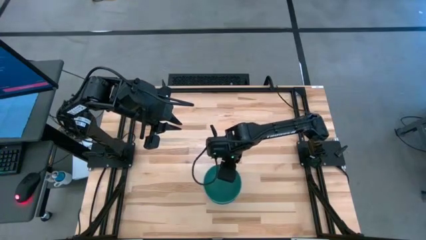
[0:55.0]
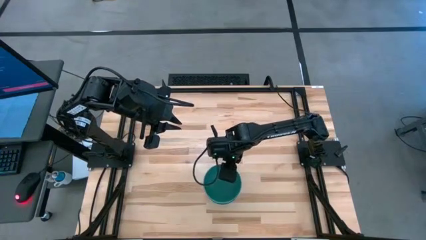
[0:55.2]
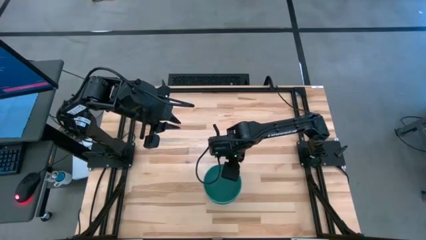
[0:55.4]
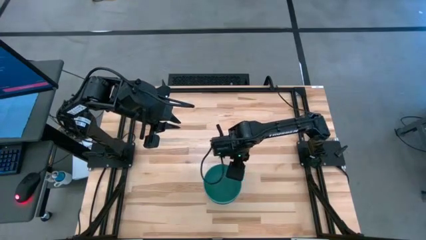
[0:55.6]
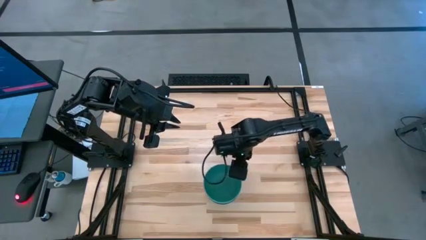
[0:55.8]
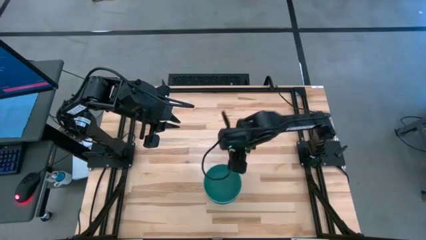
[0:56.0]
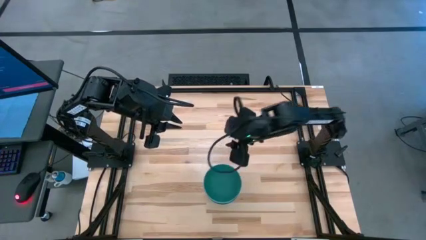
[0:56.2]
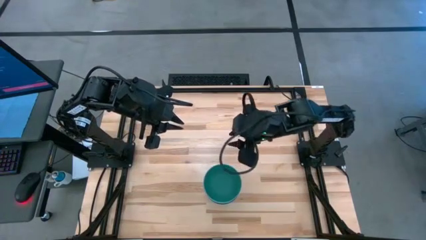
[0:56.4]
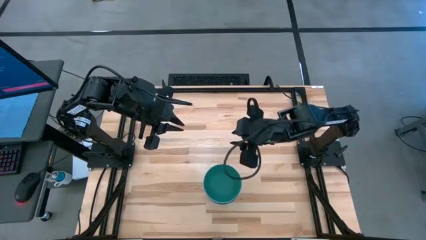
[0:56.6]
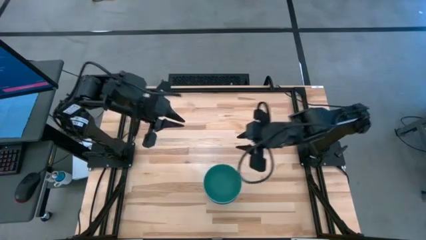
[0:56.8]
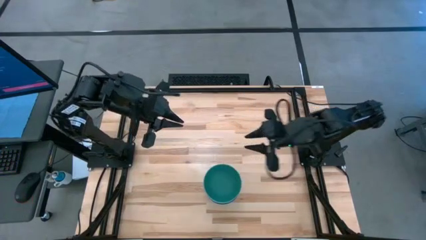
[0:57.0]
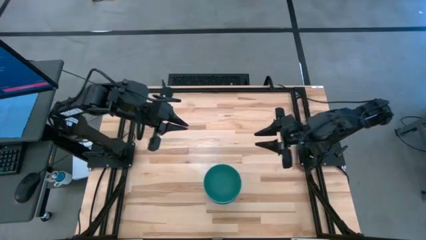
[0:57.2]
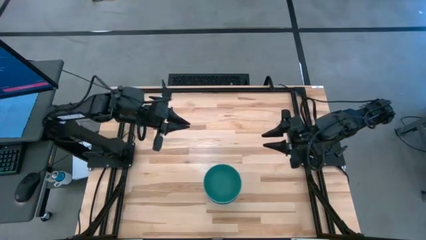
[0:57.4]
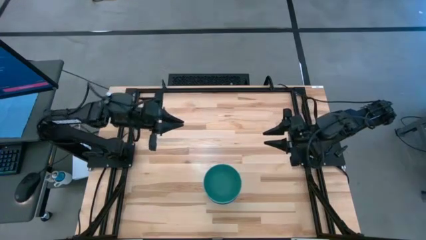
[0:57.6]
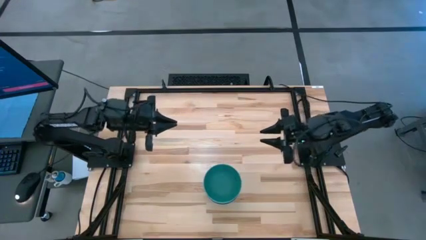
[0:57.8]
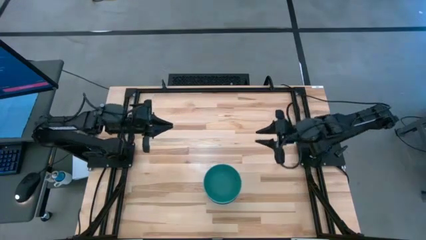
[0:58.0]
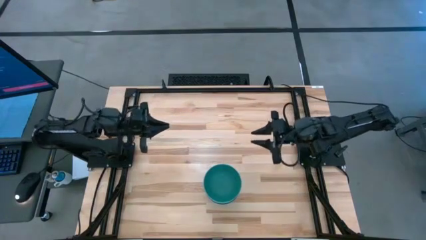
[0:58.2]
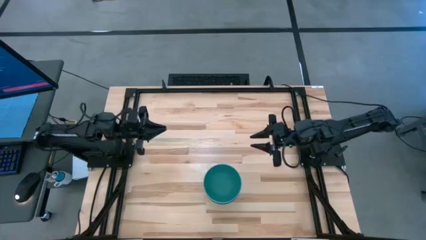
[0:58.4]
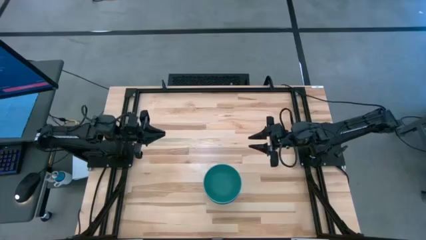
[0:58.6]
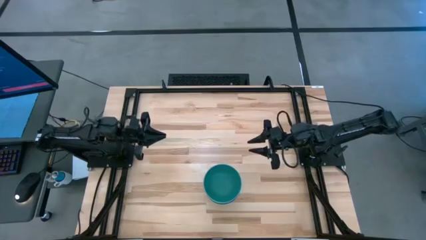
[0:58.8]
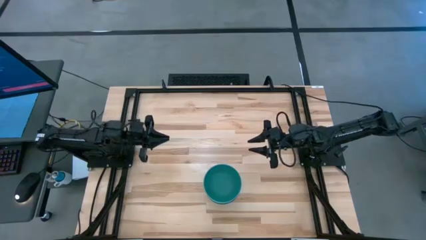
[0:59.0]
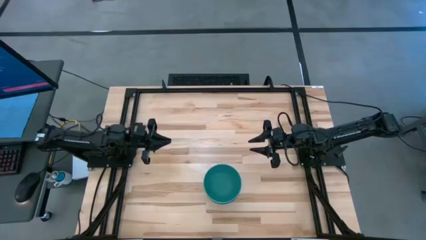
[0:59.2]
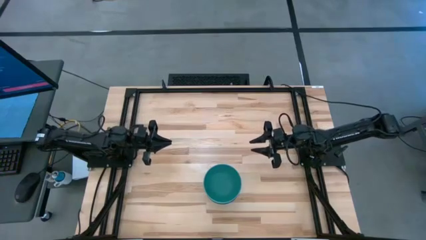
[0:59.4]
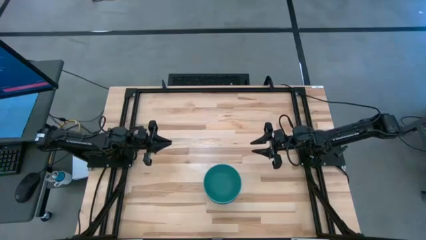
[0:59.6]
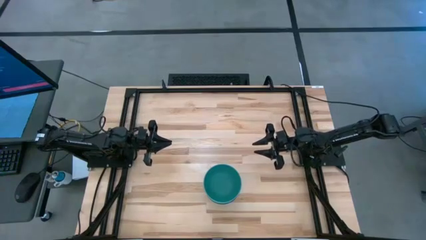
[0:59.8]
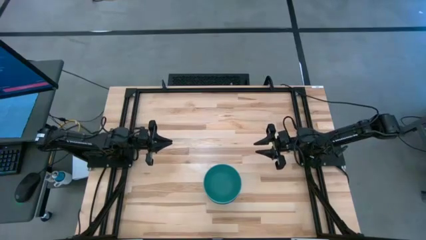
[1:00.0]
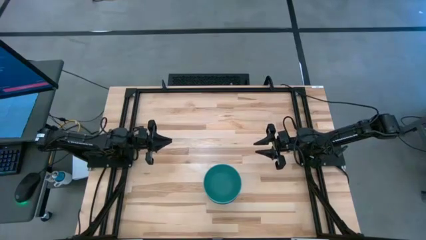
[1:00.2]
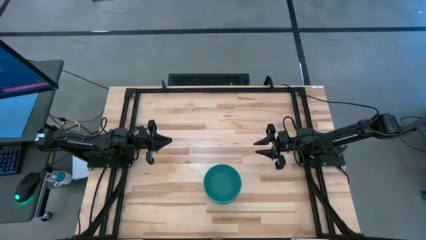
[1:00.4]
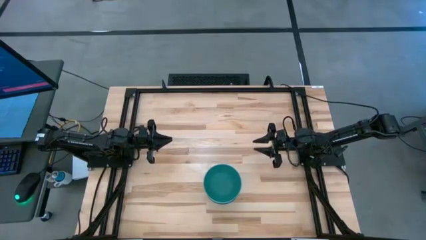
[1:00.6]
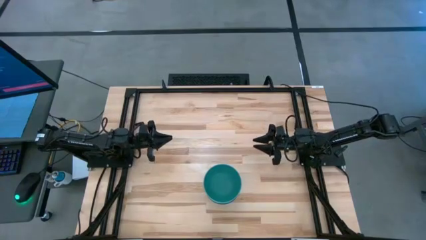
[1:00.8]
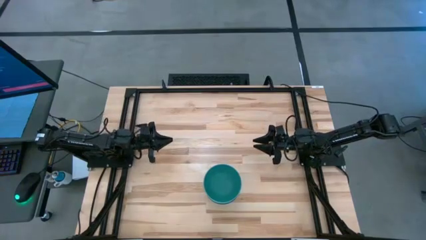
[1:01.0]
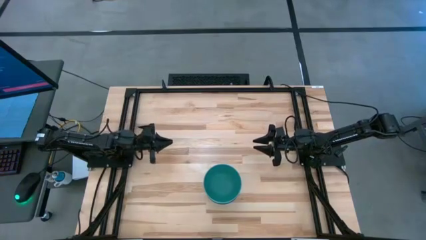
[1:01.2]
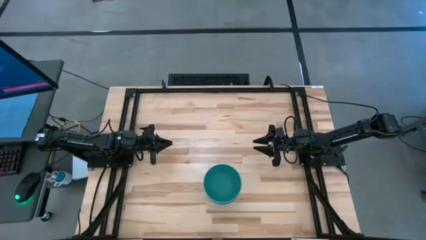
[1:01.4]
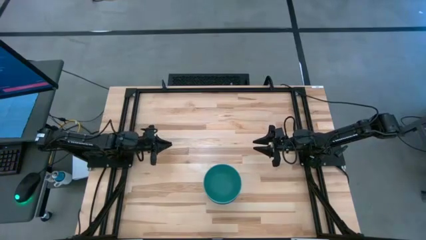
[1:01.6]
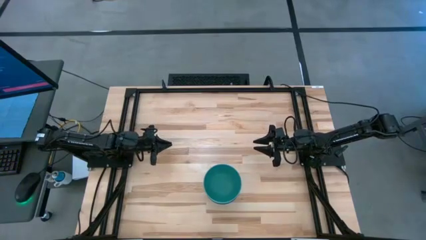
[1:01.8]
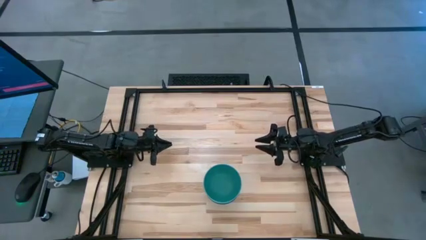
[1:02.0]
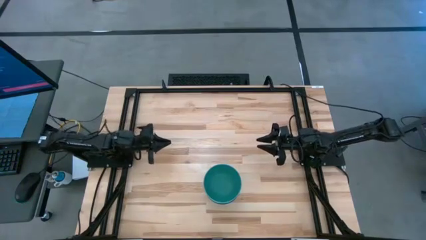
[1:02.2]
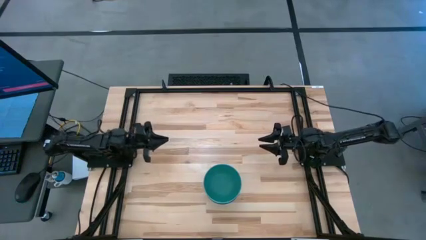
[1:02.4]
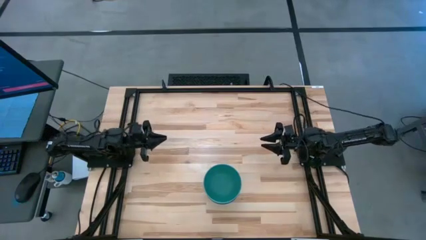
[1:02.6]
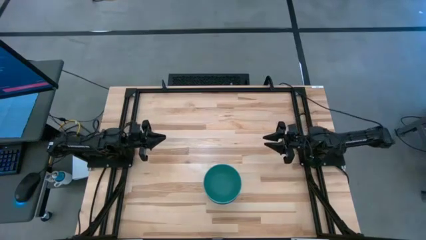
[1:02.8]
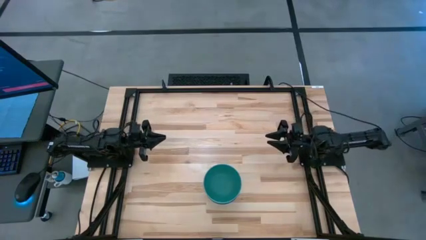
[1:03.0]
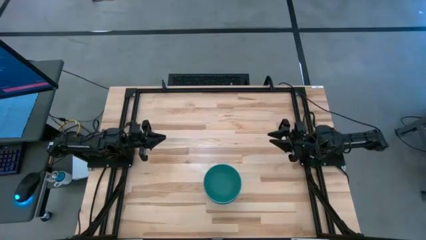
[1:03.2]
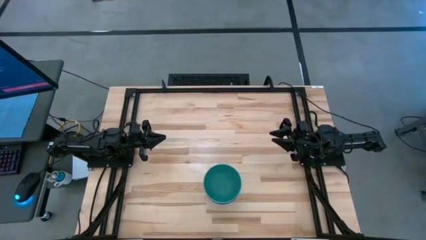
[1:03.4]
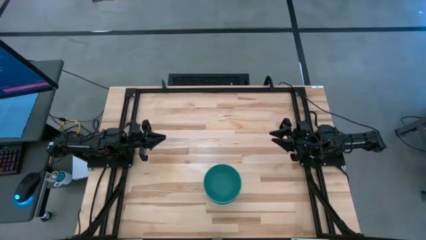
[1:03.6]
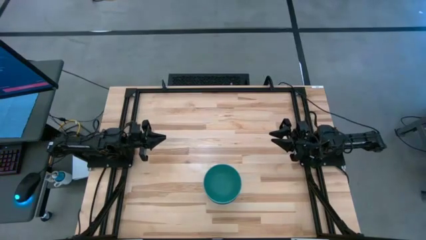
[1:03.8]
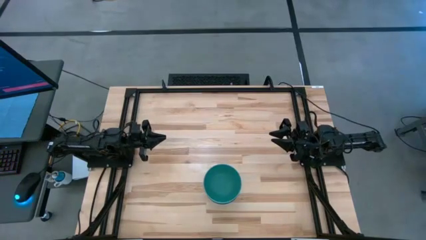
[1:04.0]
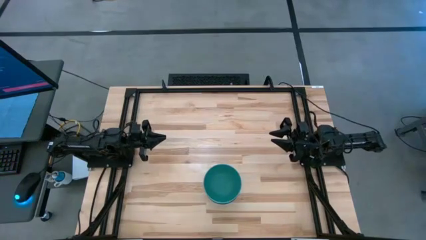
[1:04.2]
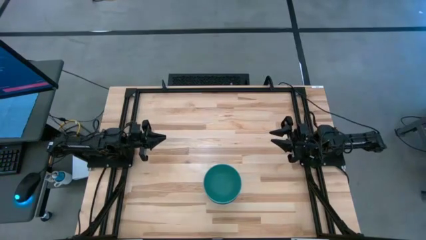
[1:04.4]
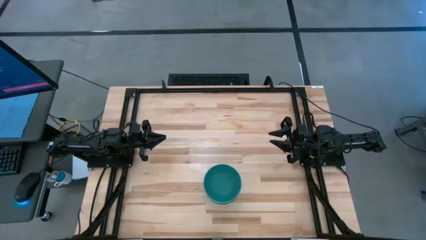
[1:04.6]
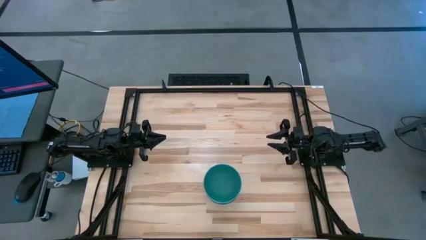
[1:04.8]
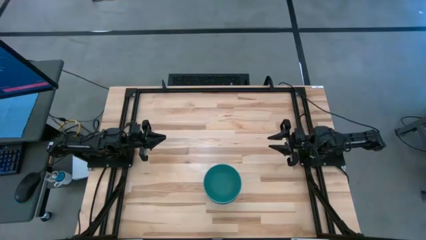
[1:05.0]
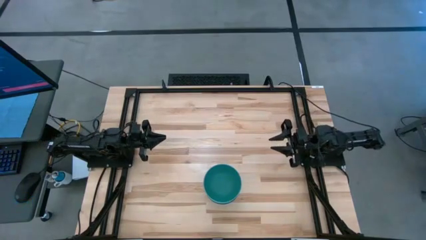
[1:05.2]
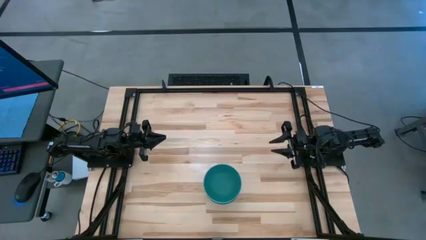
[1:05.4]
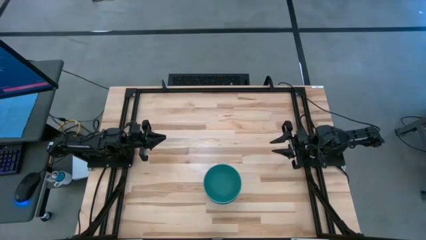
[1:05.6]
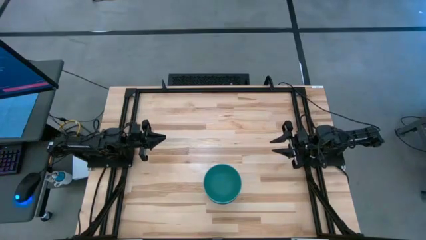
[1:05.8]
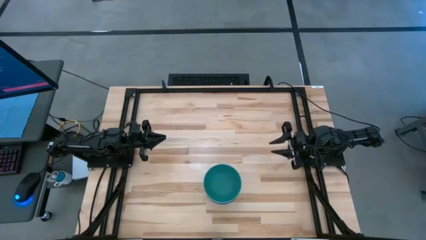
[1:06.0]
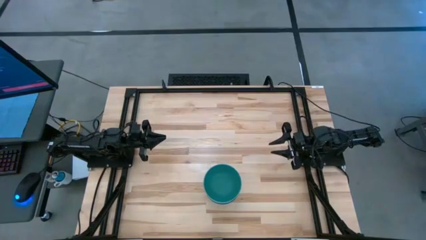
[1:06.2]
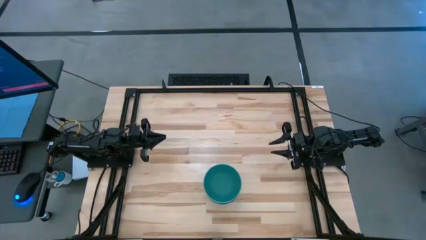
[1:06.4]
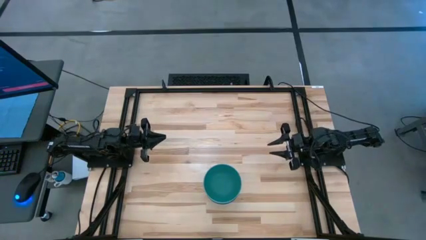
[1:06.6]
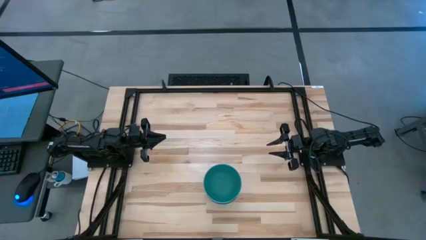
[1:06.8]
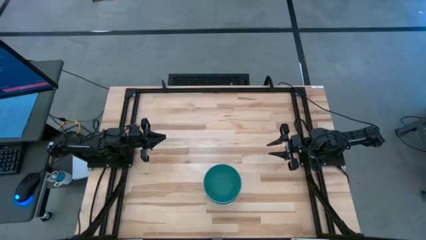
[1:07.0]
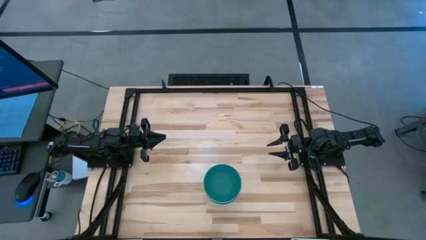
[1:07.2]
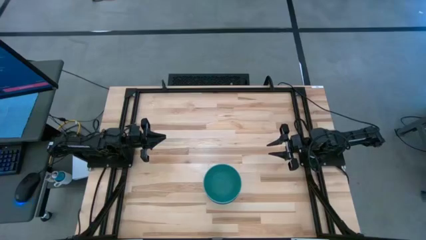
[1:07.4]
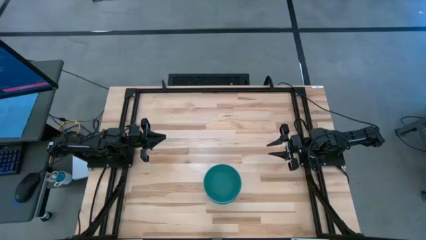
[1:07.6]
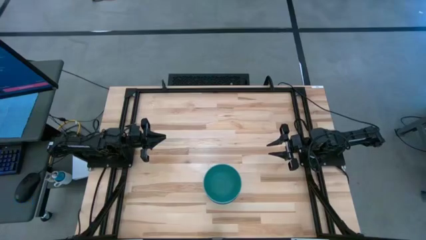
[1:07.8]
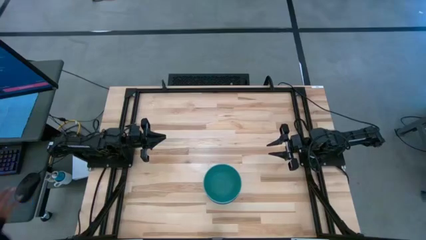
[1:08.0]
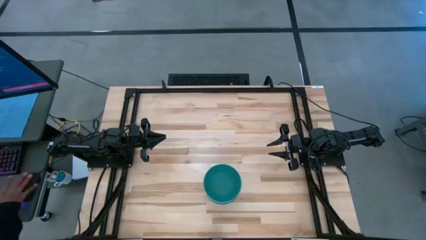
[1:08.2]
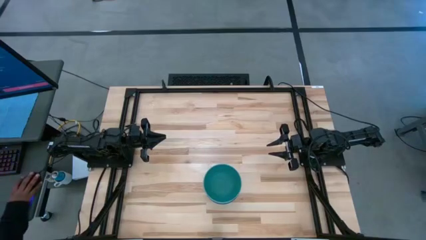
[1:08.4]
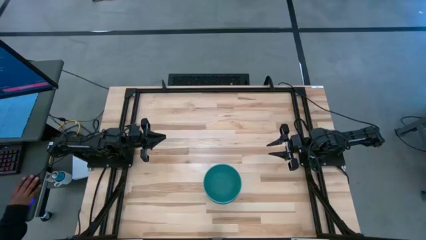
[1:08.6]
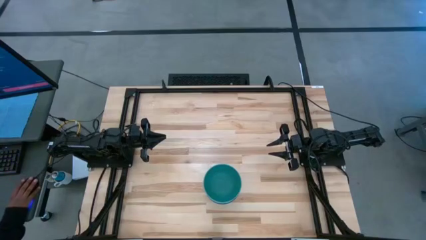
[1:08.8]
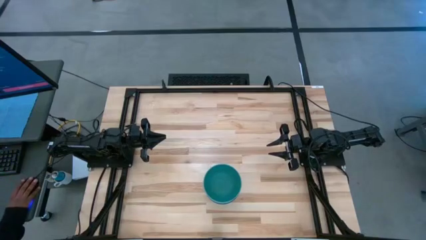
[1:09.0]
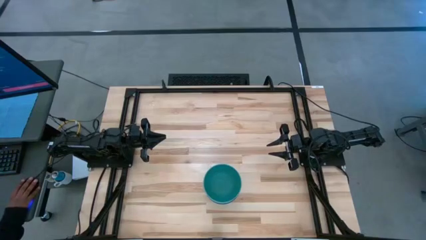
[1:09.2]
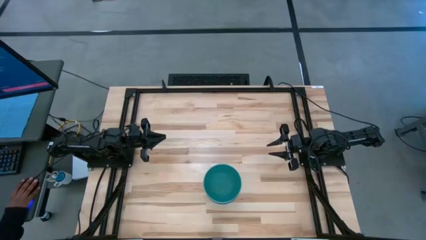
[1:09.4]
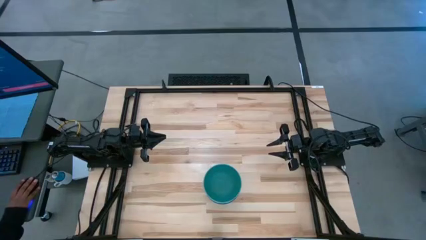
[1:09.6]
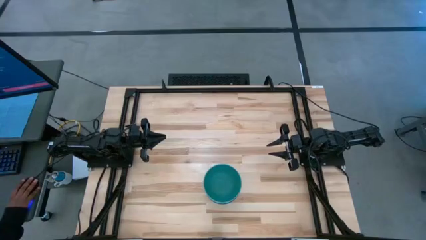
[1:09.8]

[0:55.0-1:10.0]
Task: Nest bowls inside each other
Return to Home Position

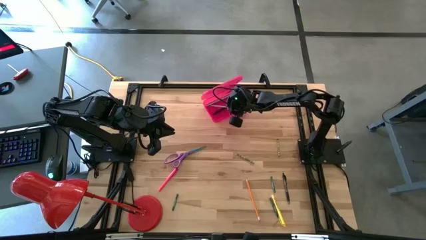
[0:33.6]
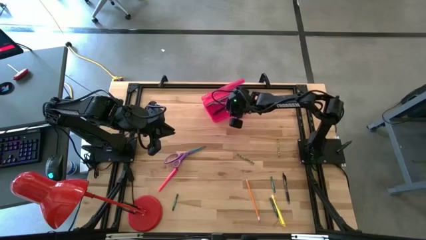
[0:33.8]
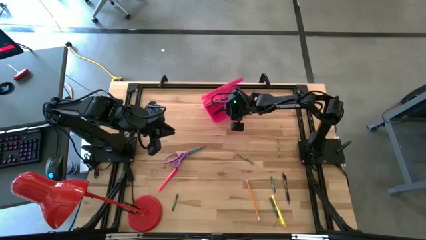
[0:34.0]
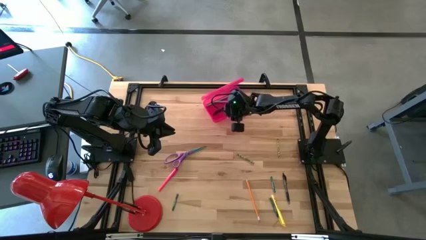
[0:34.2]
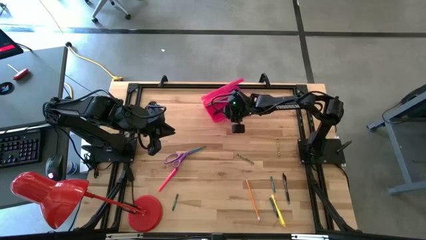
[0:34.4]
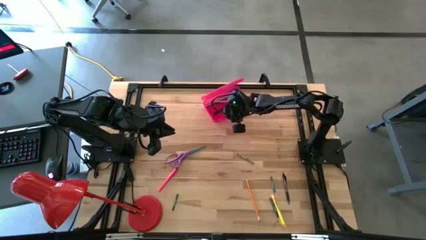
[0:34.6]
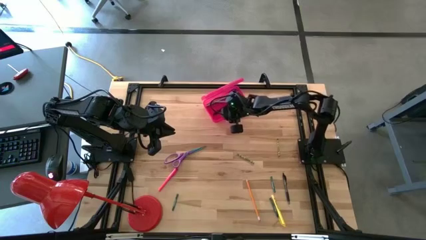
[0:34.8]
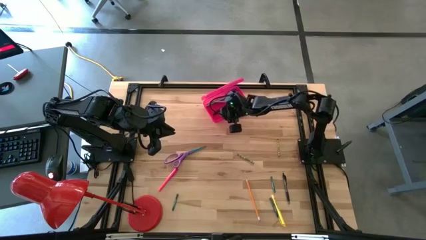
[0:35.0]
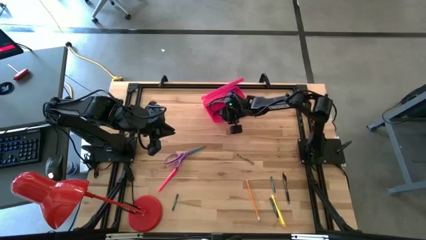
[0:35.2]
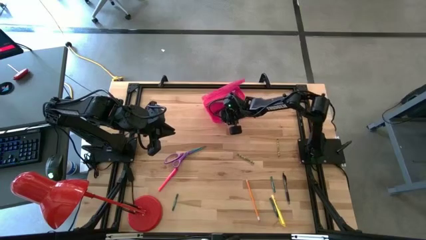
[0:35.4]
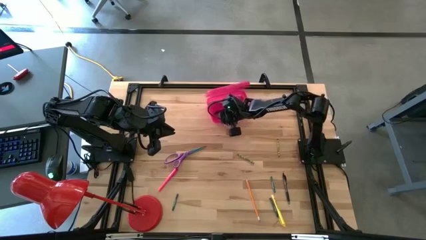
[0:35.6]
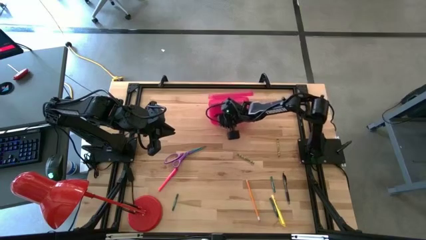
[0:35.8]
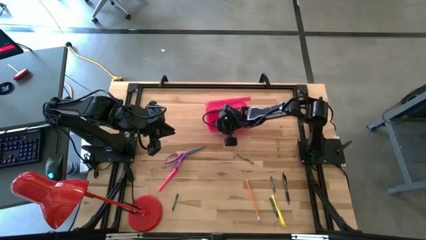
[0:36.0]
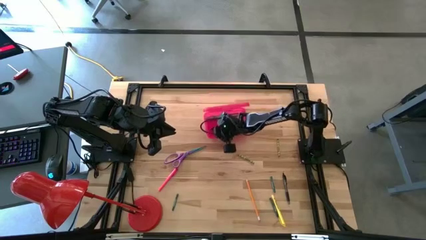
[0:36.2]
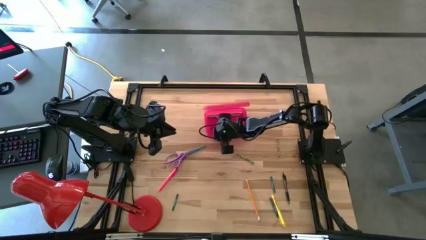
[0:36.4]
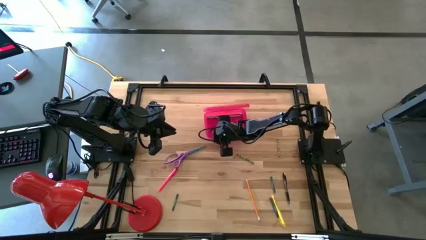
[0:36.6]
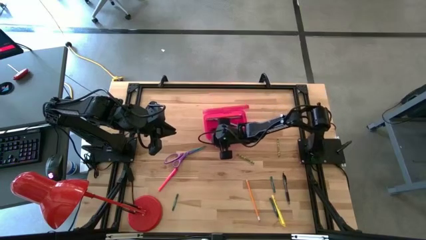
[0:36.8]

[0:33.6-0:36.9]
Task: Pick & place school supplies into a supply box
Adjust the pink supply box
